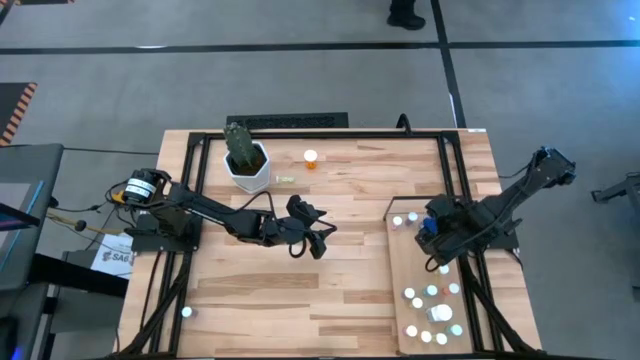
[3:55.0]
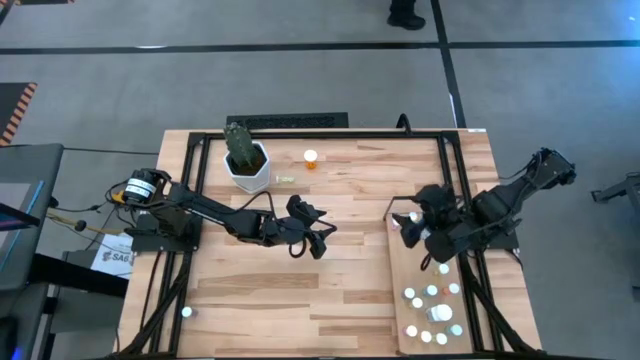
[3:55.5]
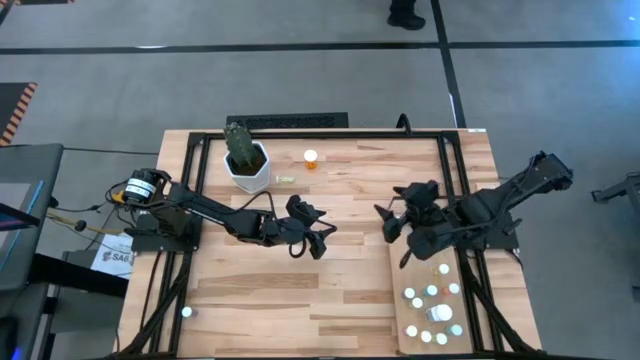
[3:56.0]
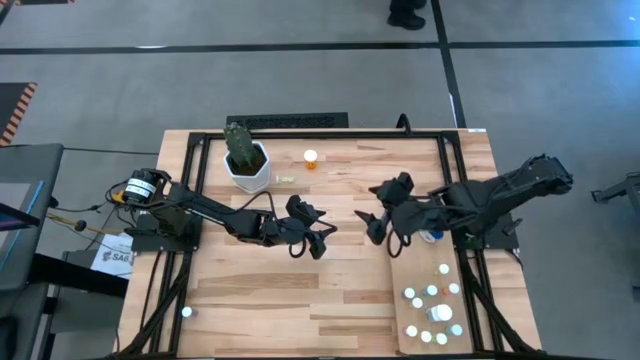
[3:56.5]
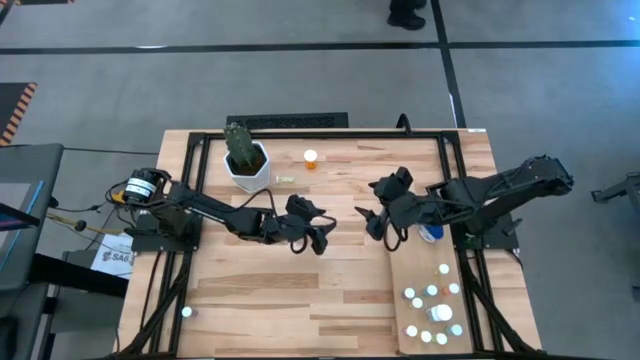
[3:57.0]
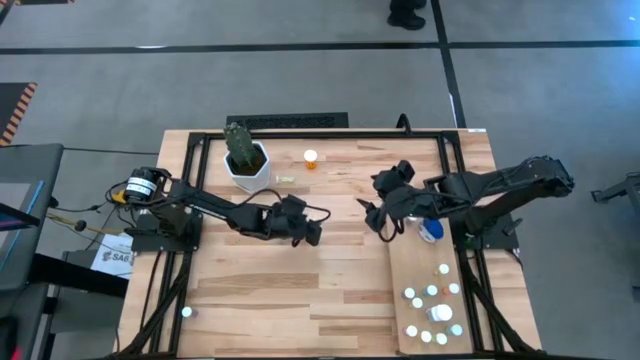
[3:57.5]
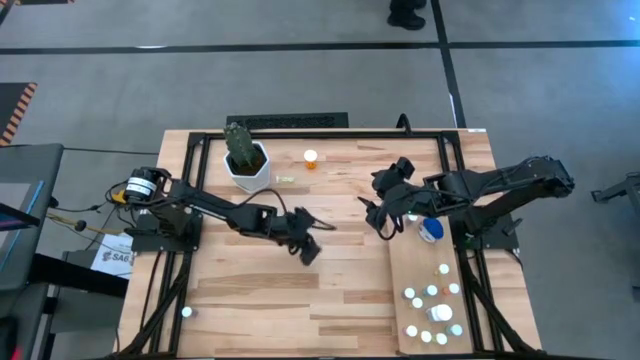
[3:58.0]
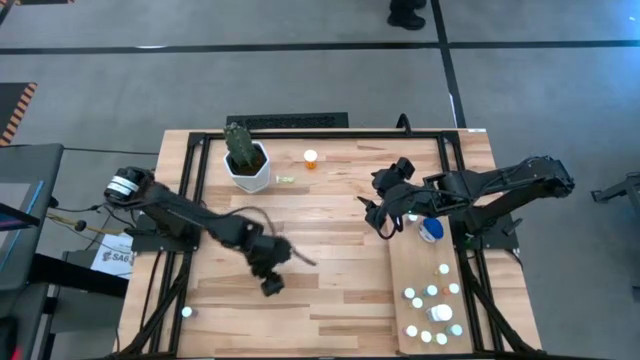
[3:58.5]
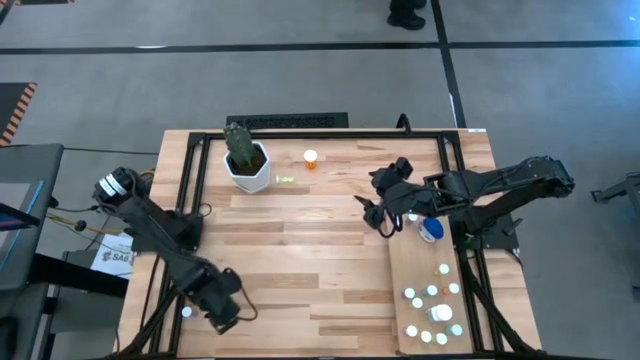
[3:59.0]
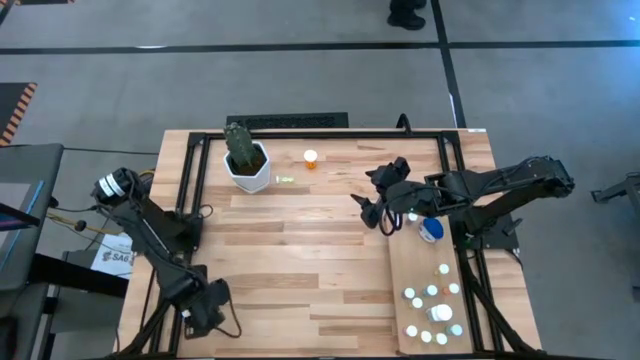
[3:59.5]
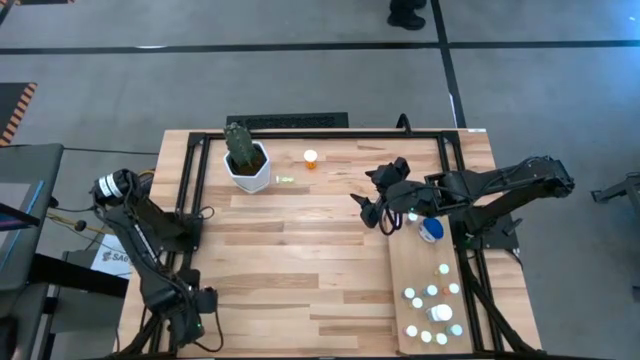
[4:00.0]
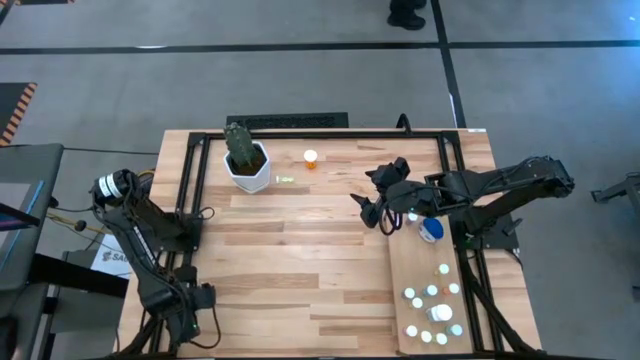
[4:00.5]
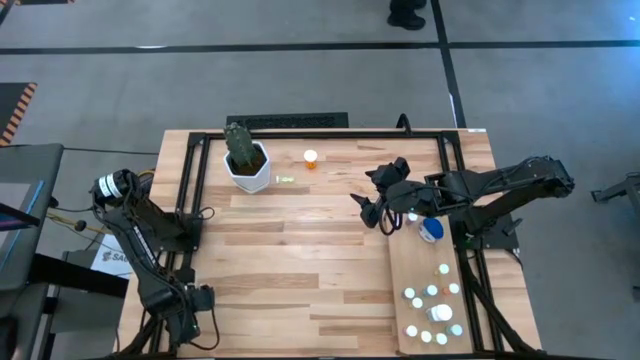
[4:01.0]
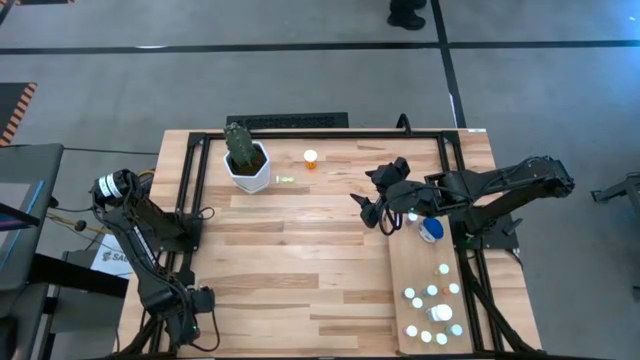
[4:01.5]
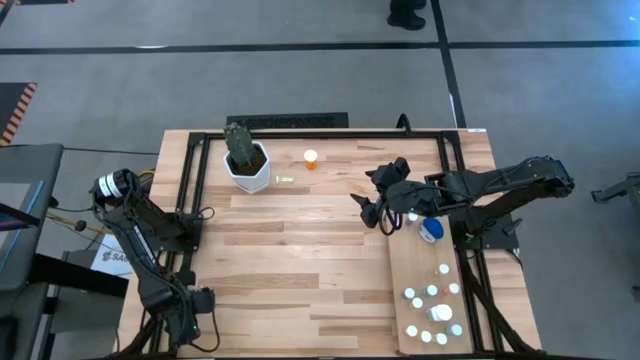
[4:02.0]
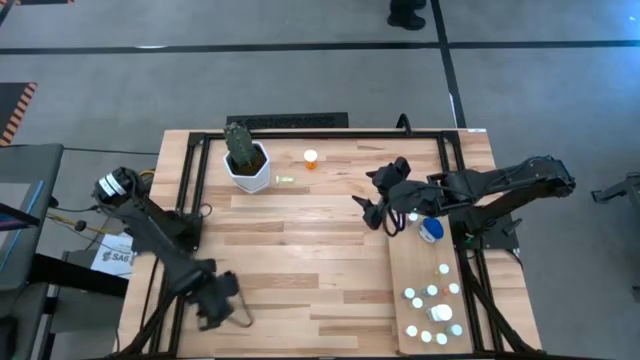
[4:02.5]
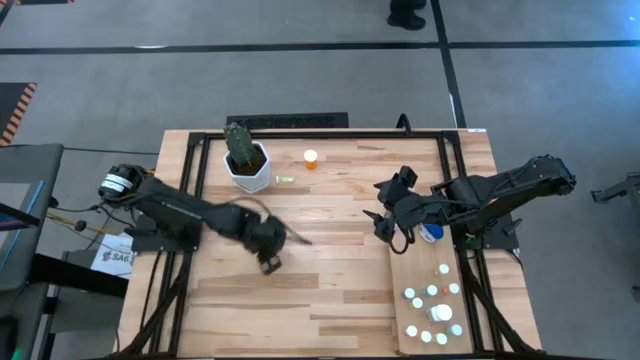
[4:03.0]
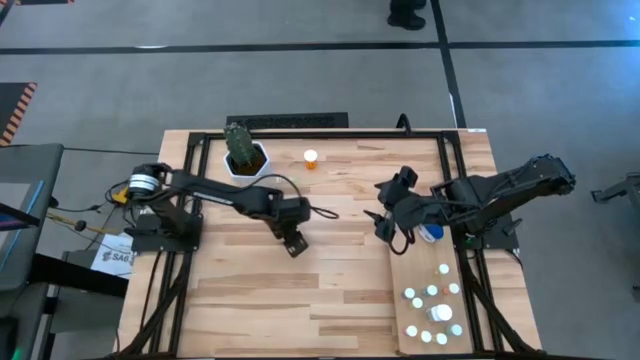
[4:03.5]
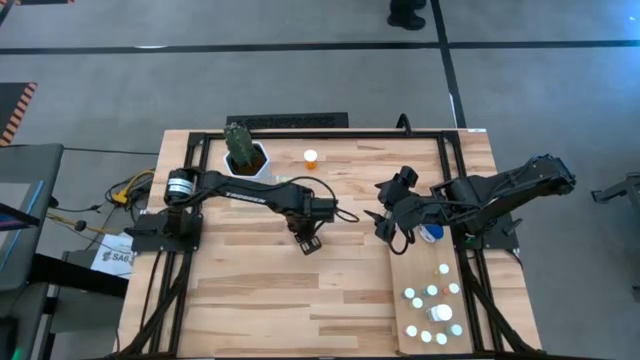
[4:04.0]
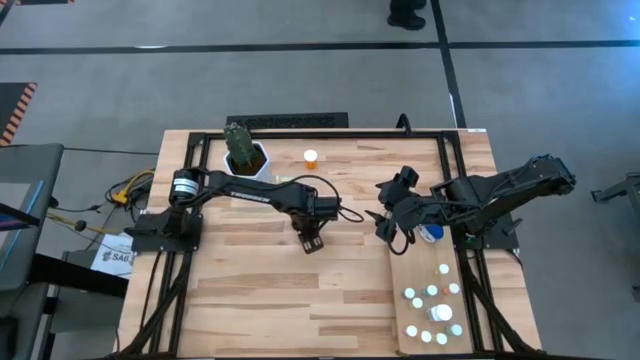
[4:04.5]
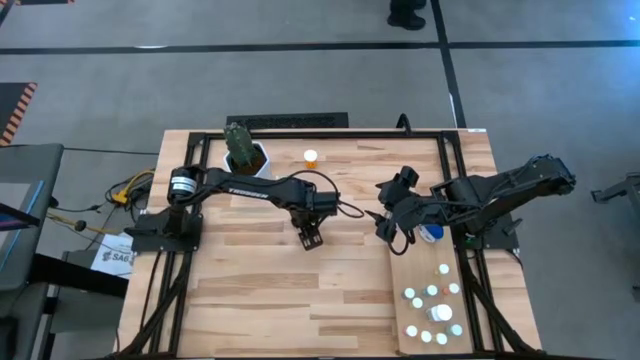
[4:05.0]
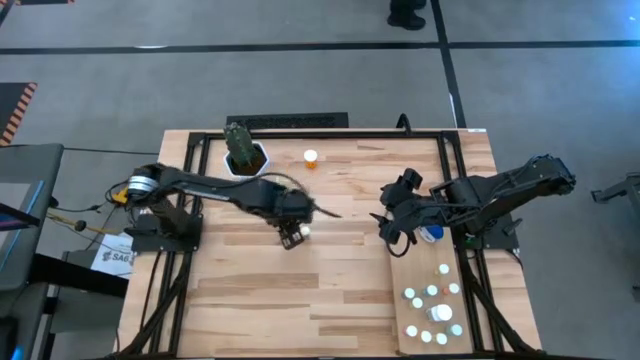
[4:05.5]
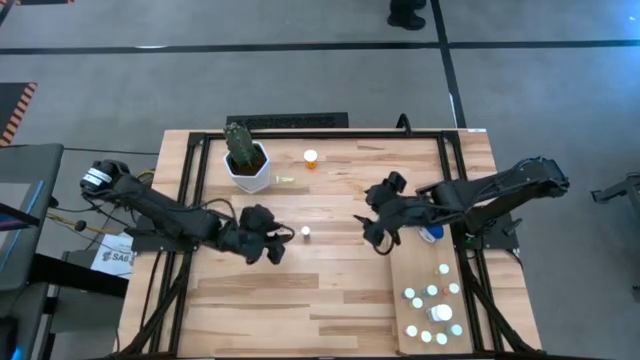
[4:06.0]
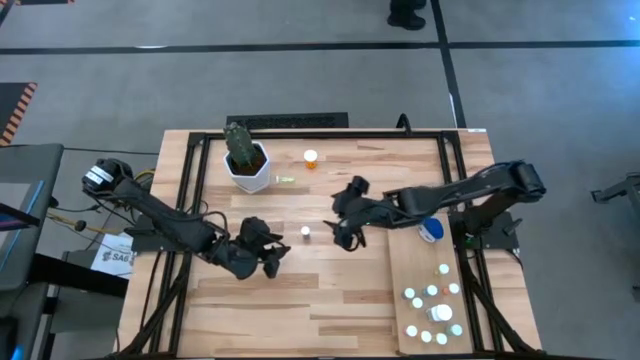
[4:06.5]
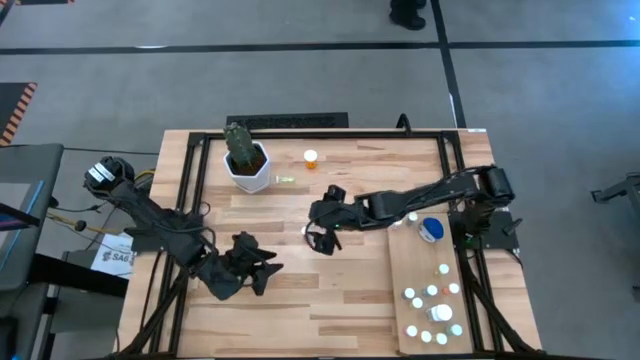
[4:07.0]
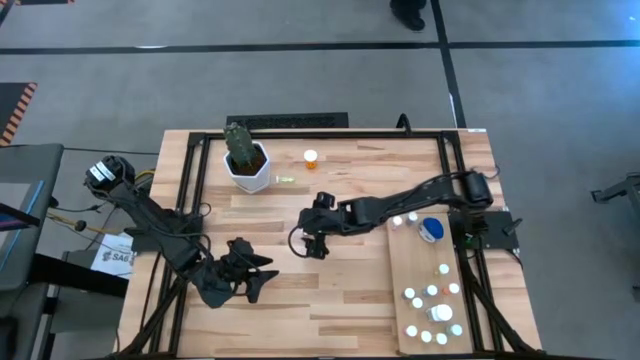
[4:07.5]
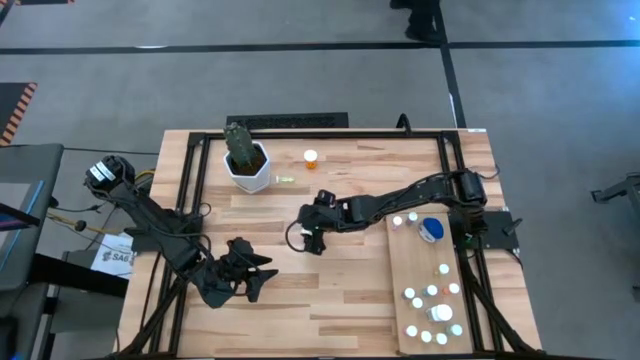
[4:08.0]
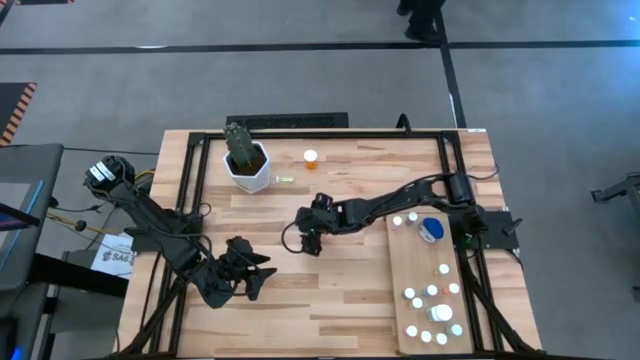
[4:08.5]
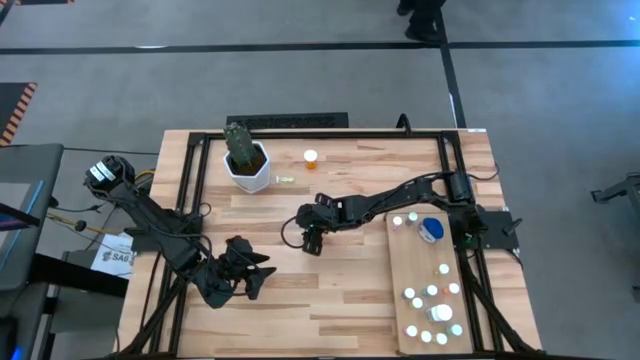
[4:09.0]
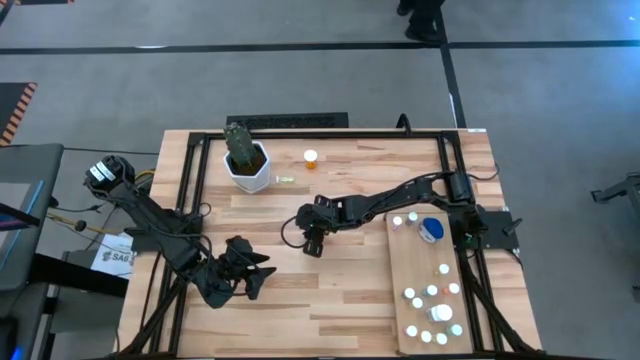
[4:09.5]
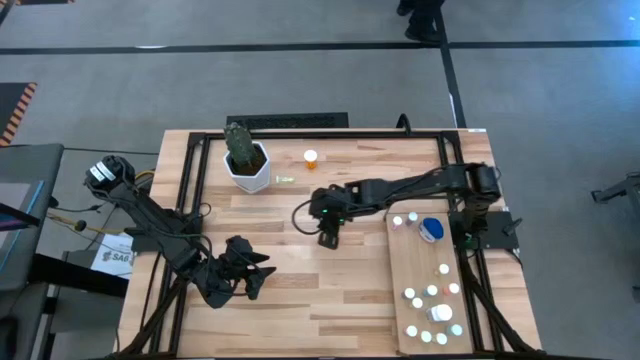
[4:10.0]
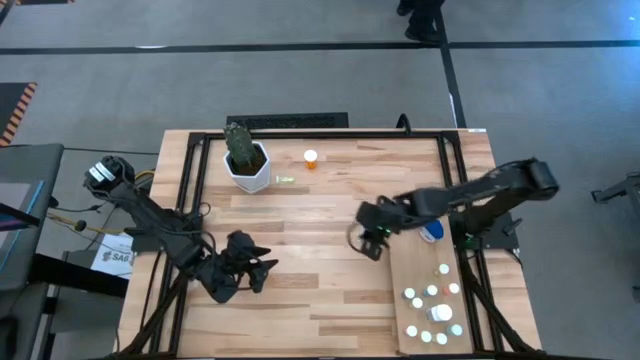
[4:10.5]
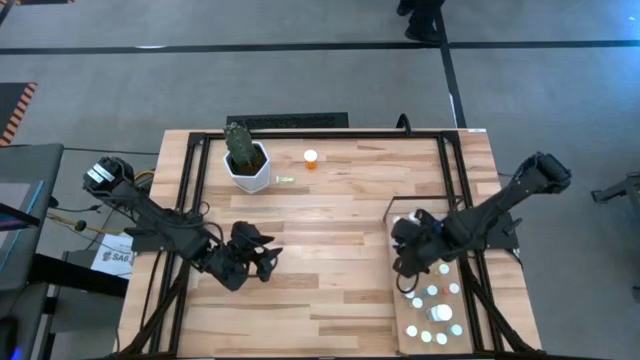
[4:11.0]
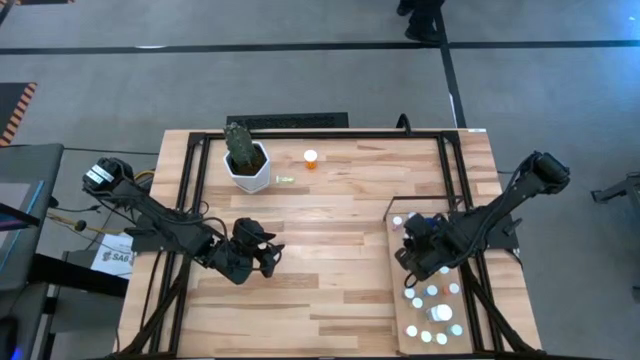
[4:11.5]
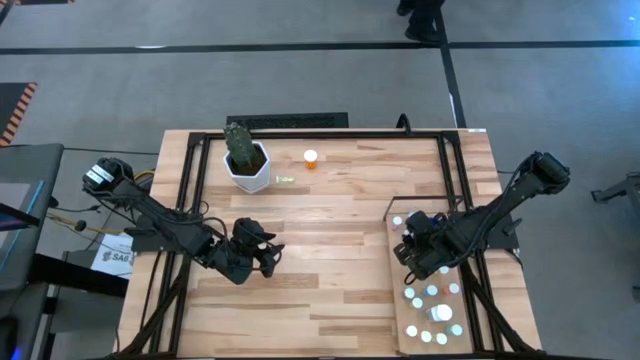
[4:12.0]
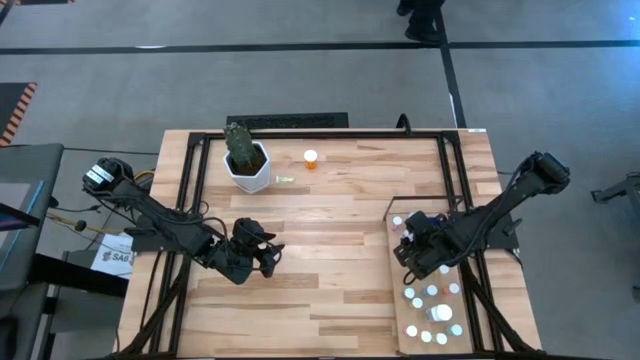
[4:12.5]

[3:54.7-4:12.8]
Task: Pick and place medicine bottles onto shelf by color
Put the blue pill bottle on the shelf

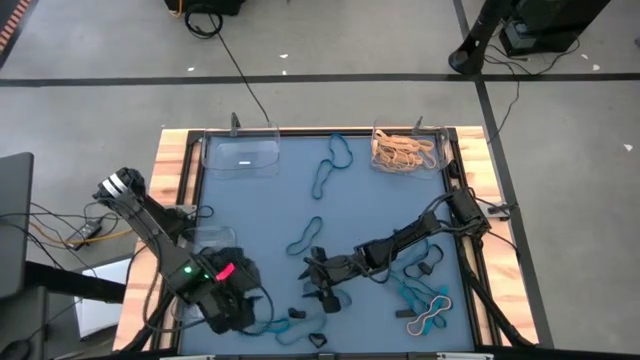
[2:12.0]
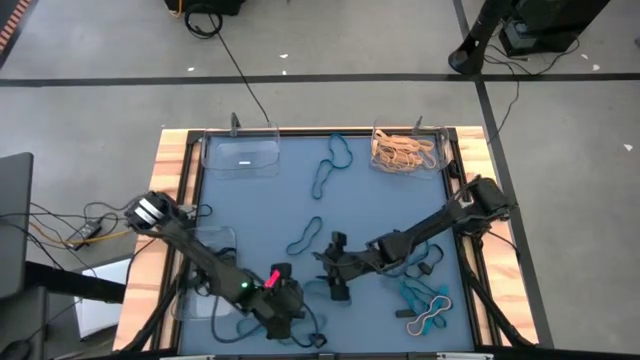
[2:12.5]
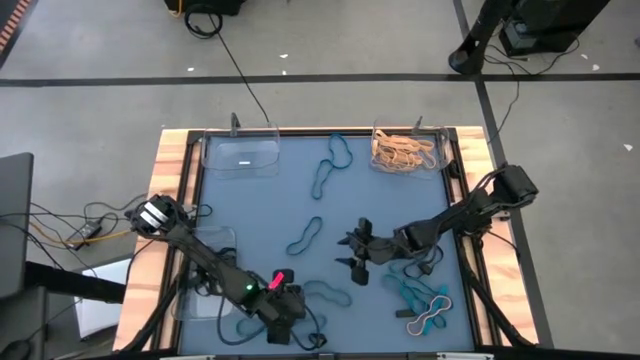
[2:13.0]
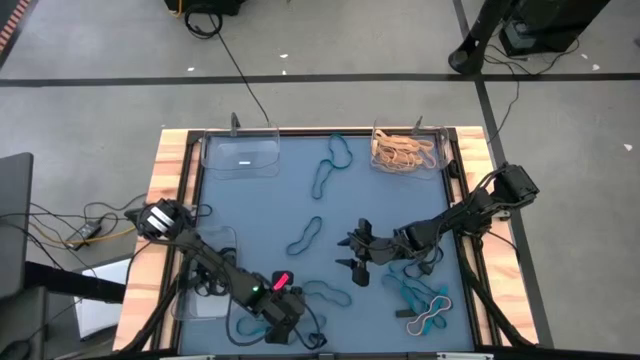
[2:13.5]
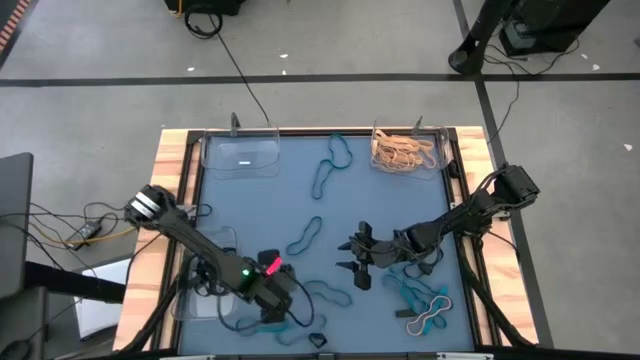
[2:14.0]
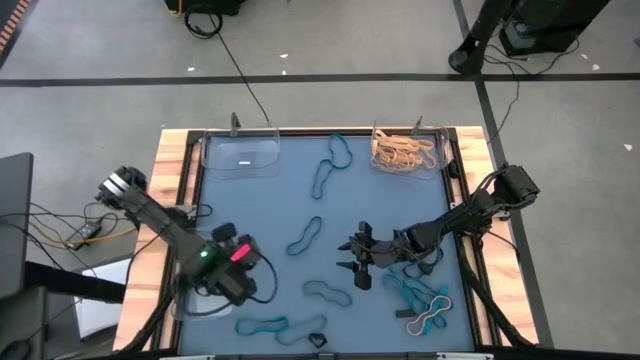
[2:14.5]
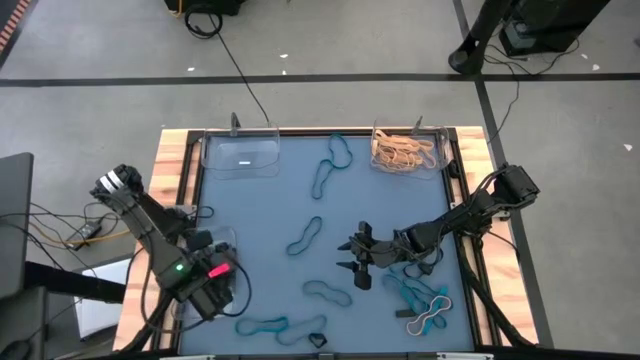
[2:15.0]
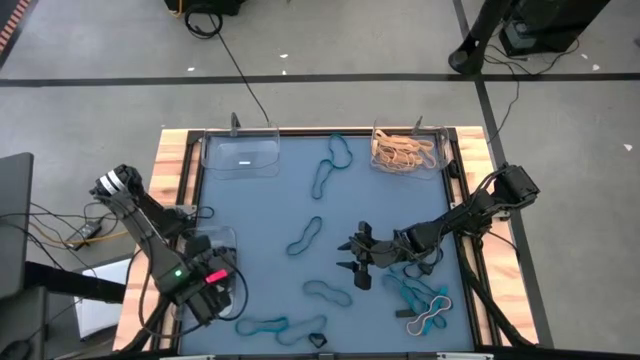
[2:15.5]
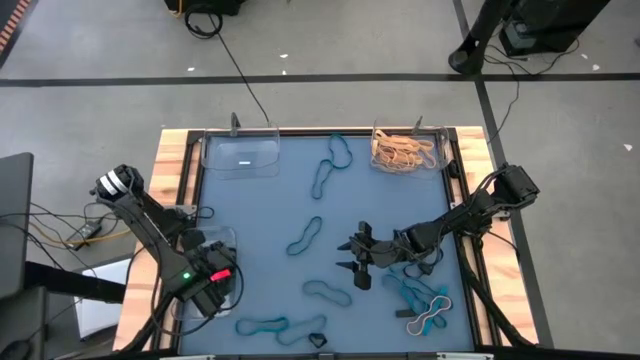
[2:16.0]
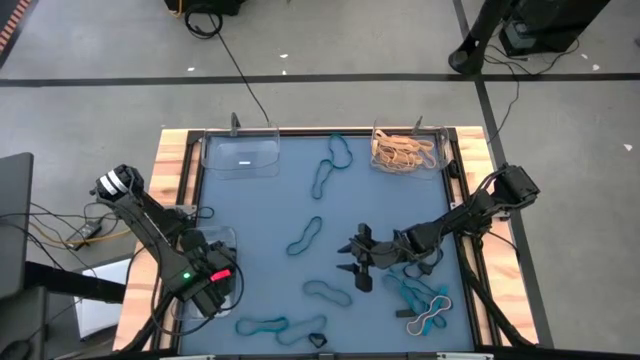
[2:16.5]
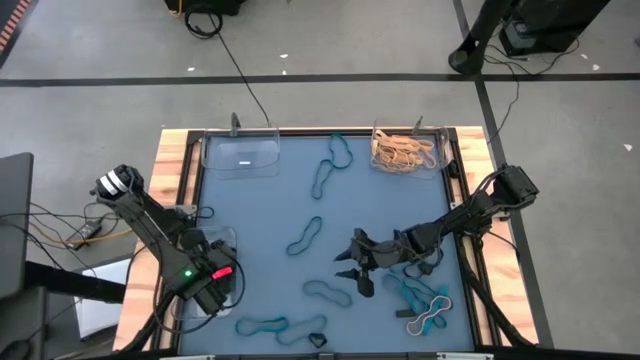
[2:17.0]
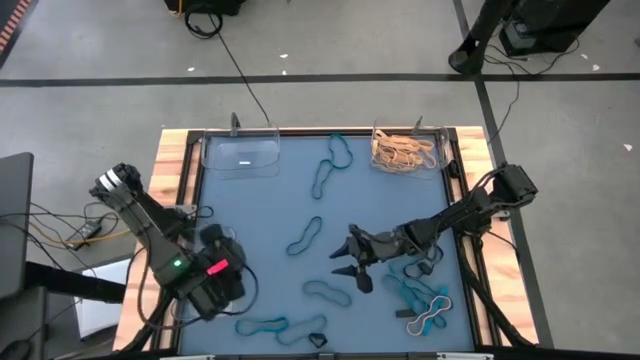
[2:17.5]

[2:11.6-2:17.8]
Task: Sort rubber bands into baskets
Put the small black rubber band into the bottom left transparent bin
